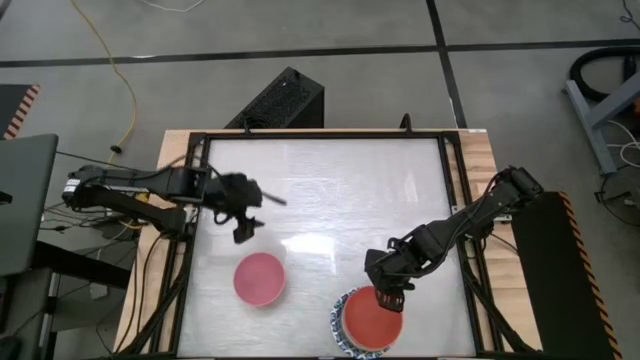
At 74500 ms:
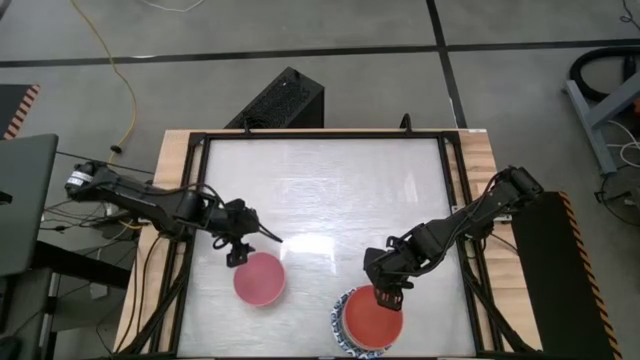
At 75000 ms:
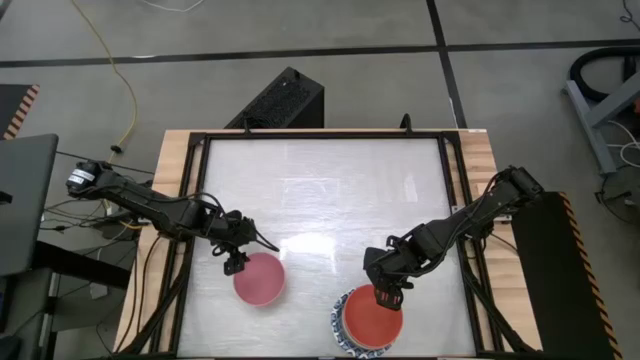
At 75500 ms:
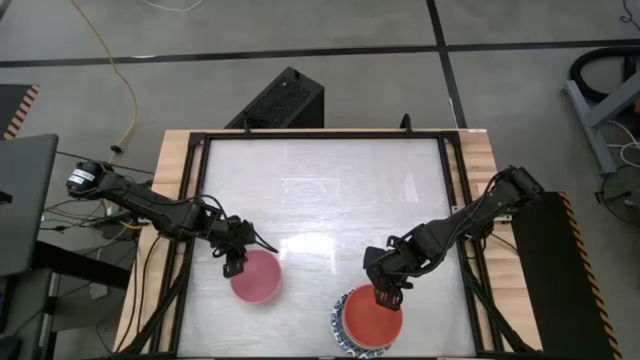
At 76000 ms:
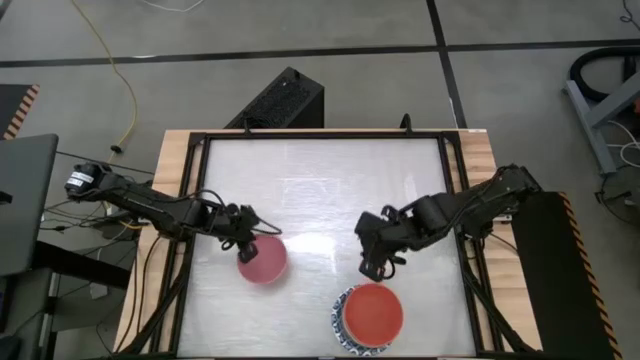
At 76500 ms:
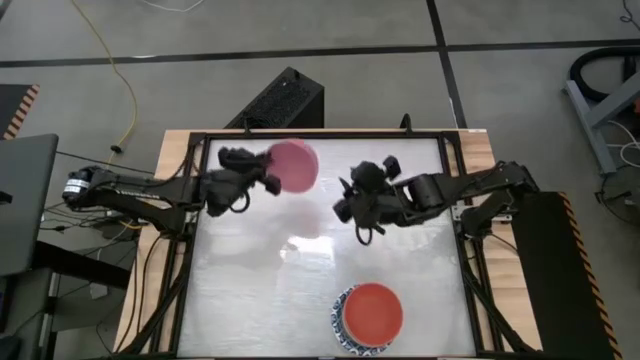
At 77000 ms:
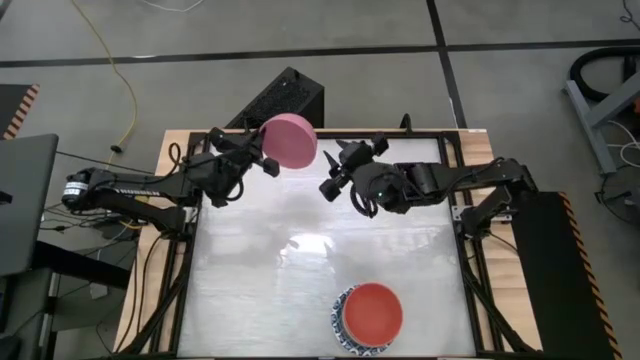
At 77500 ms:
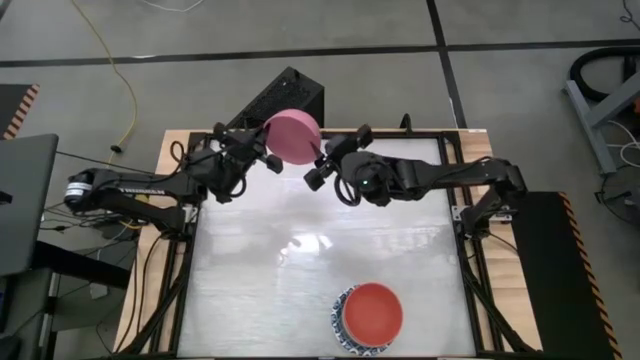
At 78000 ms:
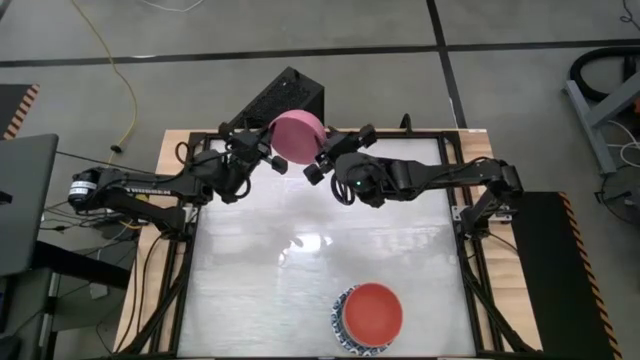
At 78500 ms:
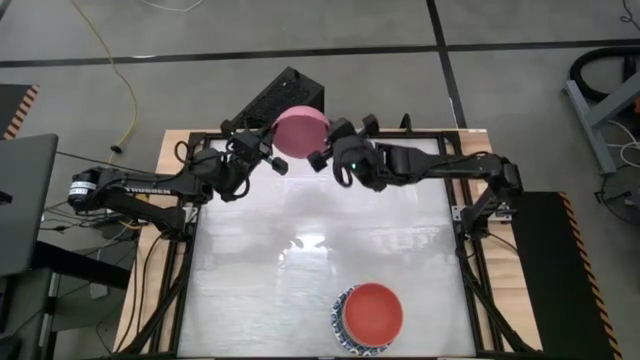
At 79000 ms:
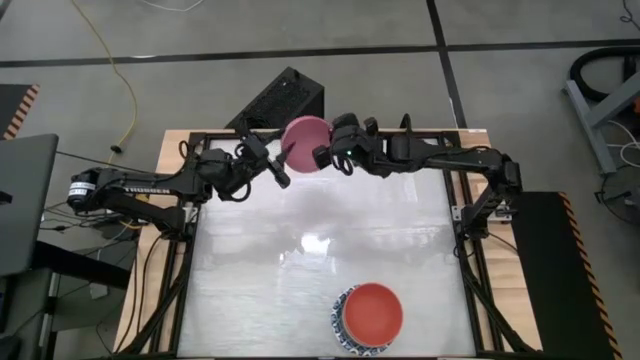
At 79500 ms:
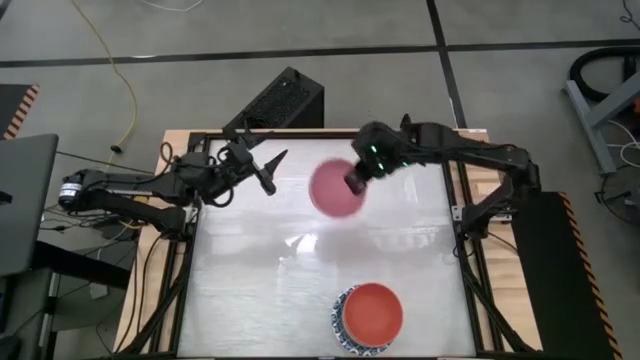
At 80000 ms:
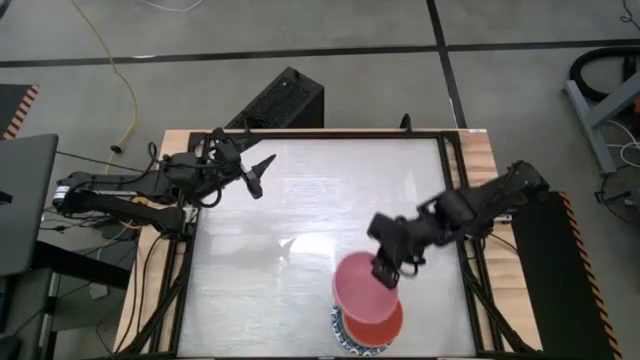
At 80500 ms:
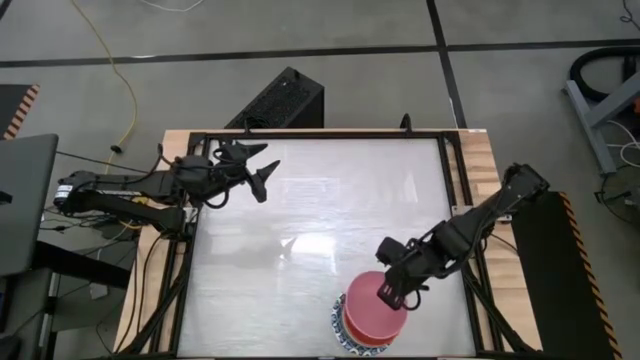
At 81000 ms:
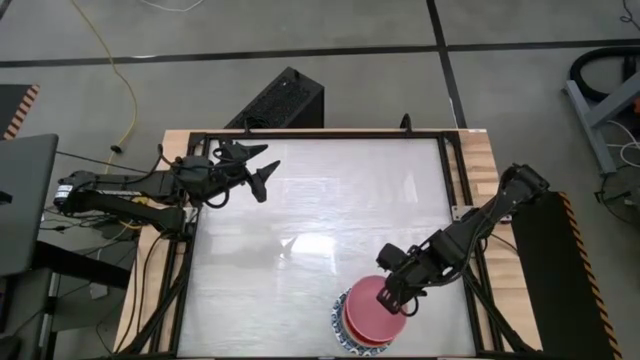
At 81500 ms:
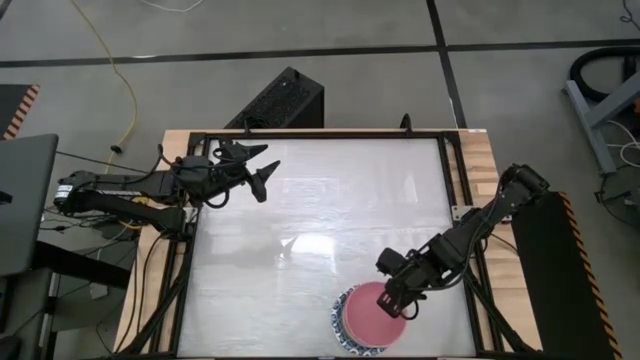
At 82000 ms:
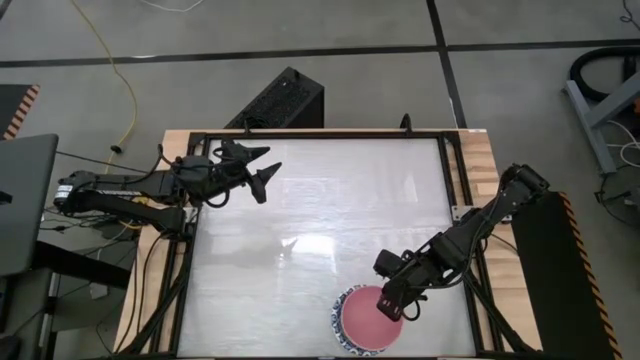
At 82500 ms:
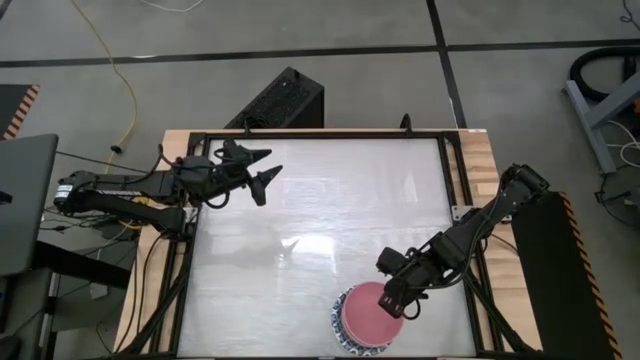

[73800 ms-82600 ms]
Stack the pink bowl onto the orange bowl

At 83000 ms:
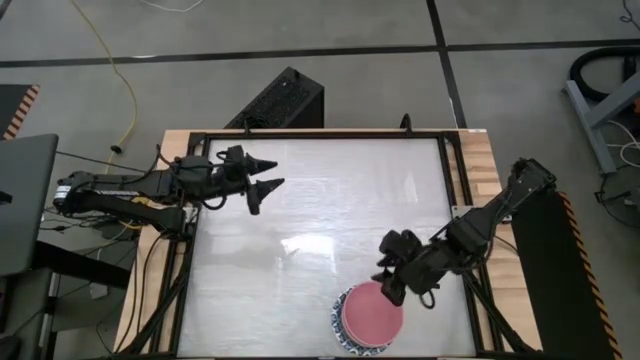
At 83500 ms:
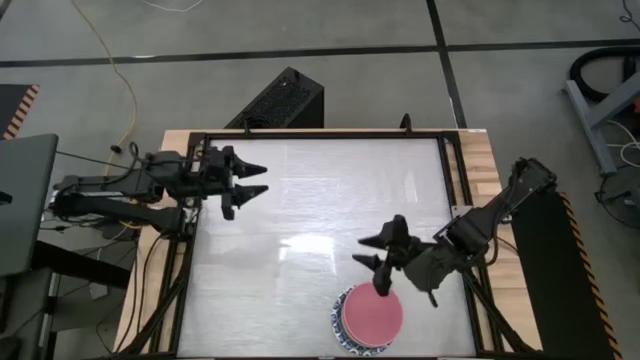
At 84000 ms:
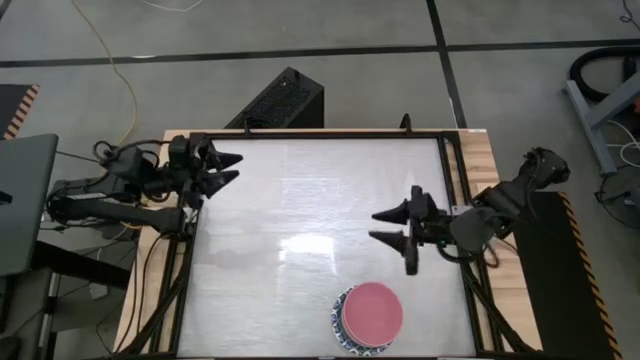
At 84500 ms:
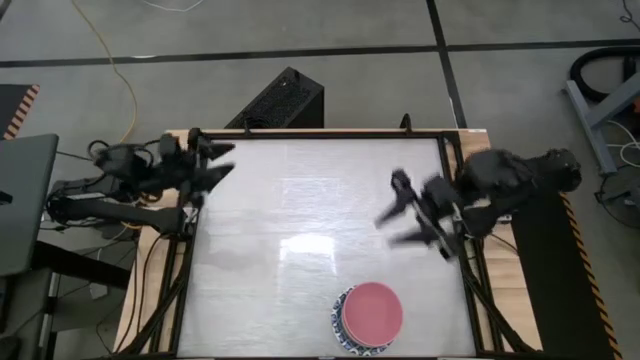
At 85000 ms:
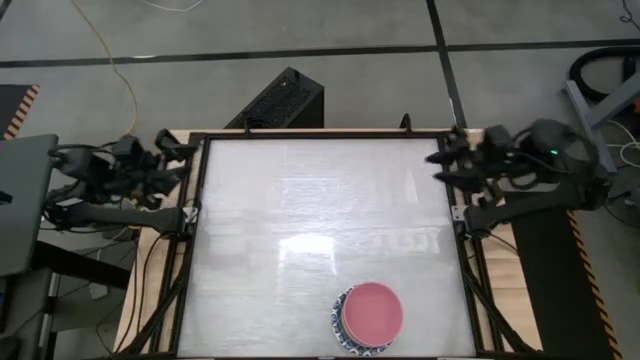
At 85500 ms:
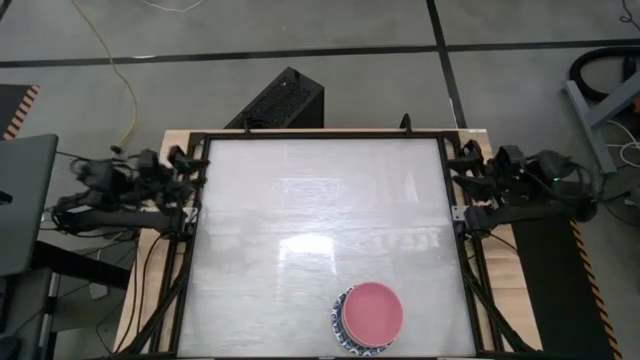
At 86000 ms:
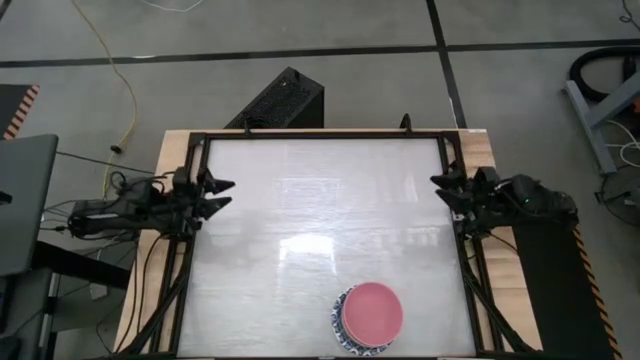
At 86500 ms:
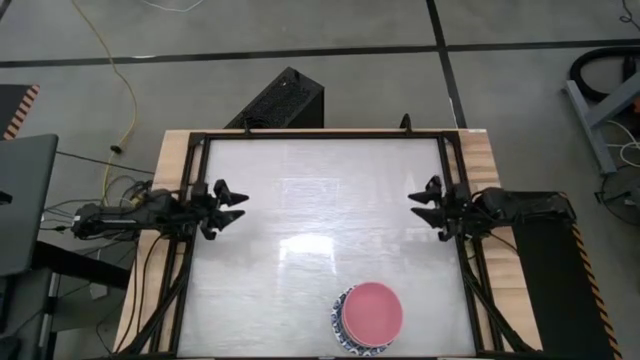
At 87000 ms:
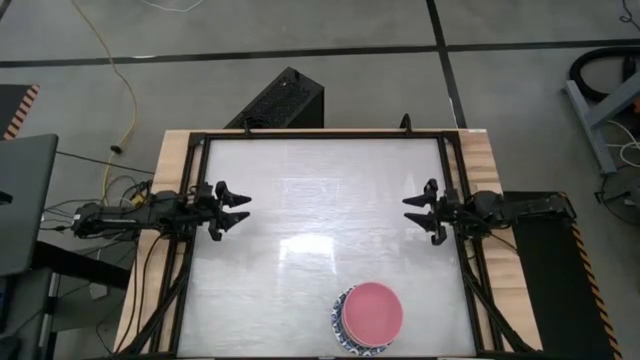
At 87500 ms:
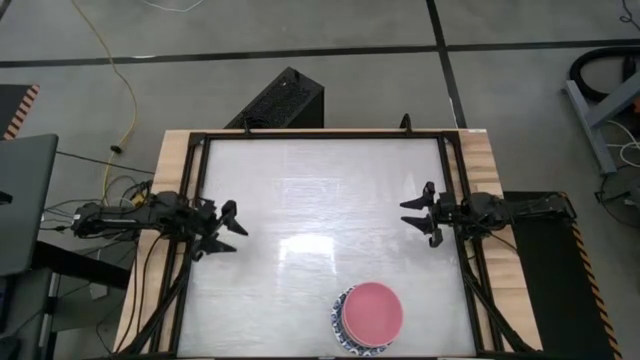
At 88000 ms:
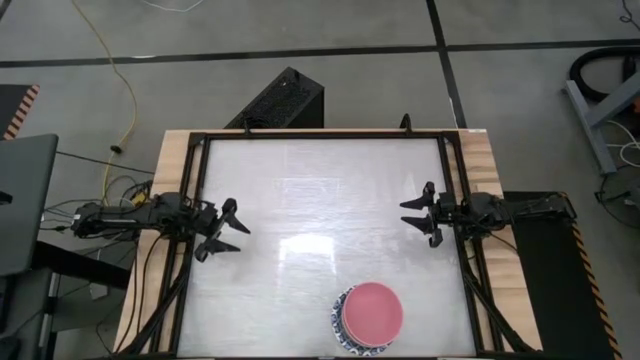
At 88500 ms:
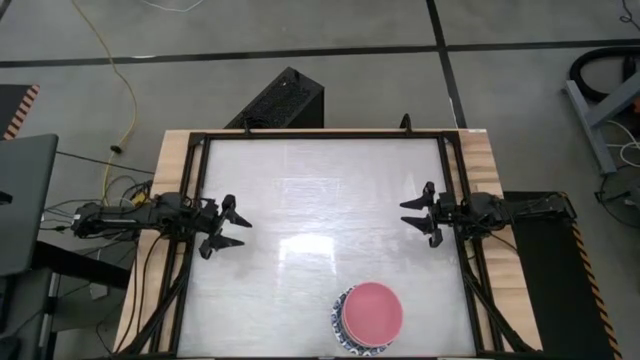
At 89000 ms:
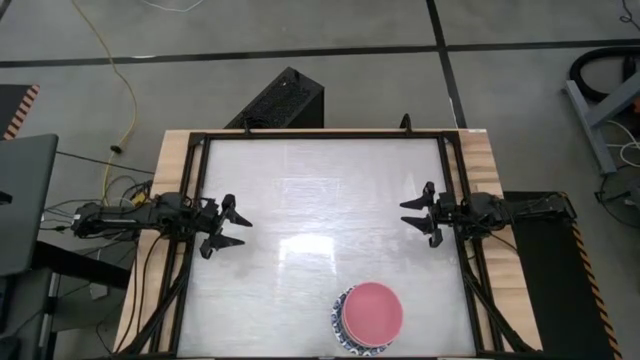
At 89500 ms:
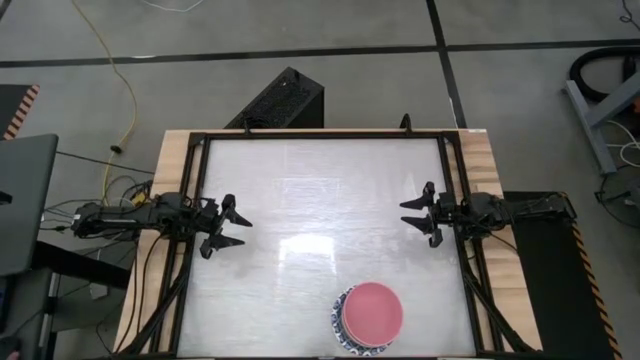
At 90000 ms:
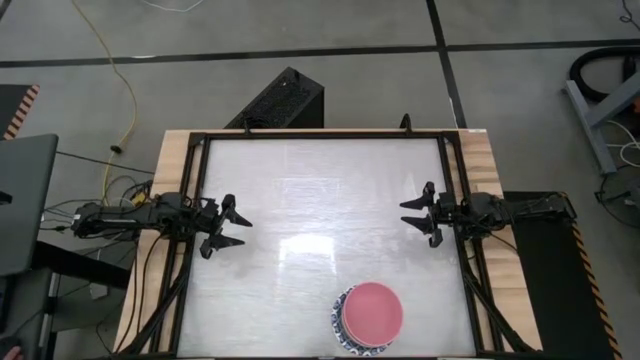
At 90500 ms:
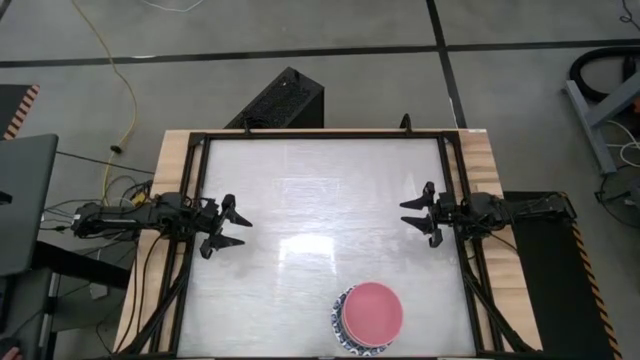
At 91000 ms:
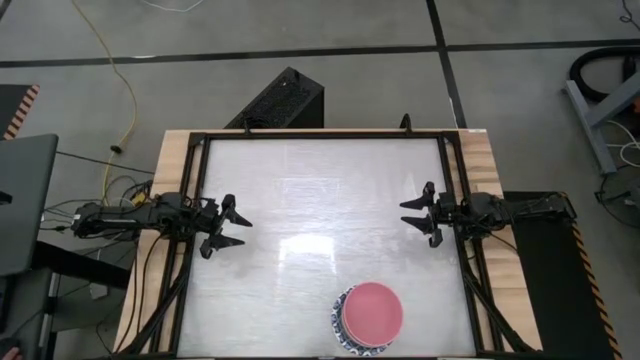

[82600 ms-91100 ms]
Return to Home Position

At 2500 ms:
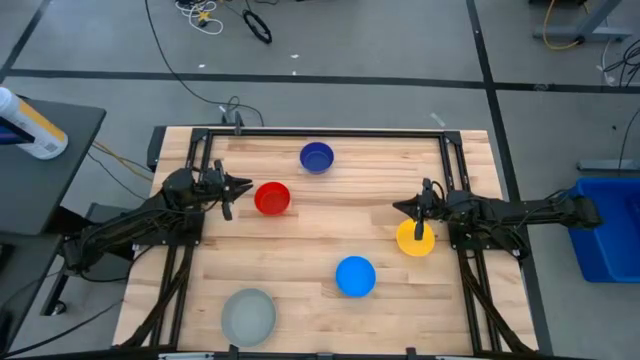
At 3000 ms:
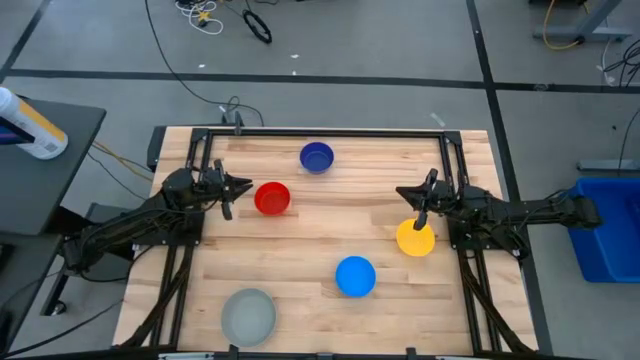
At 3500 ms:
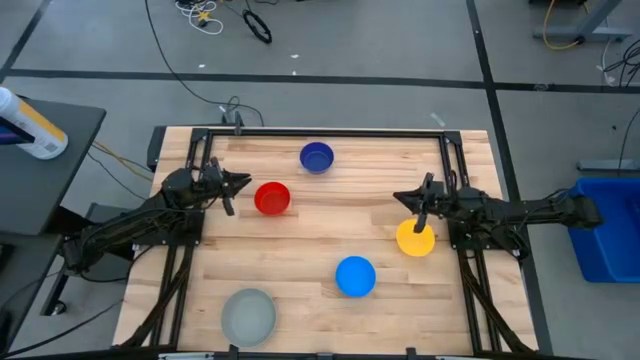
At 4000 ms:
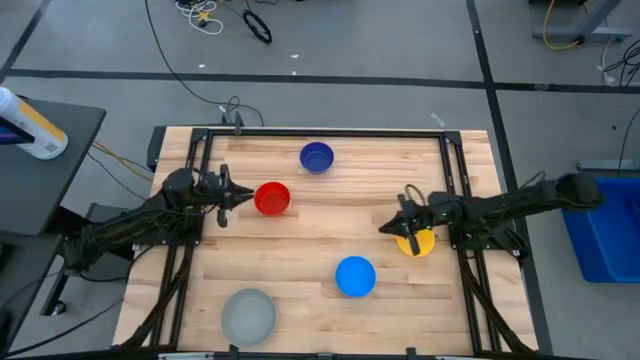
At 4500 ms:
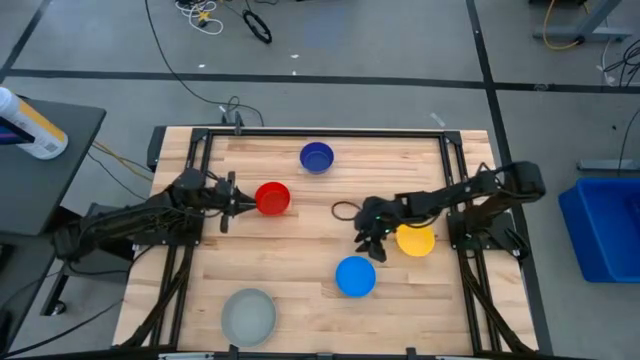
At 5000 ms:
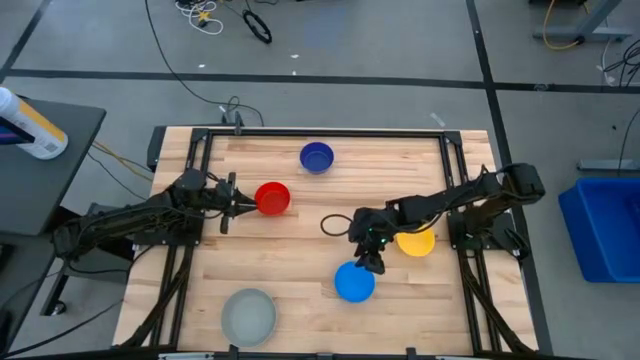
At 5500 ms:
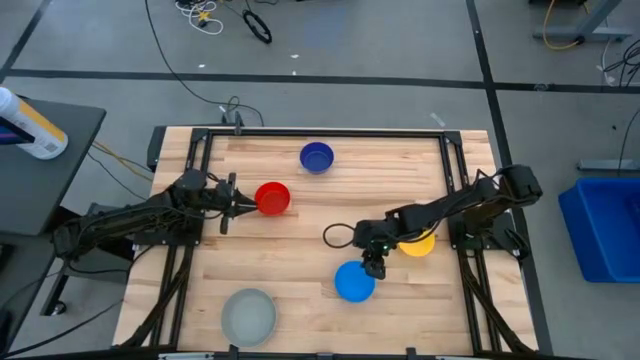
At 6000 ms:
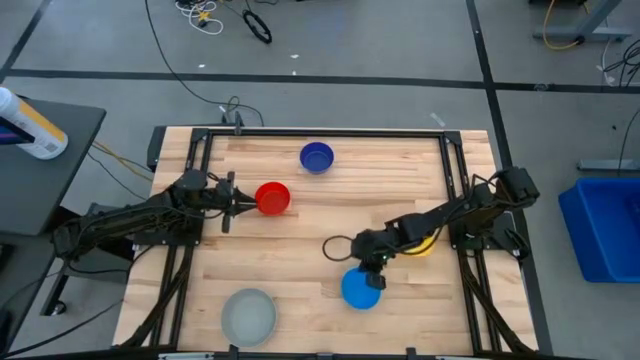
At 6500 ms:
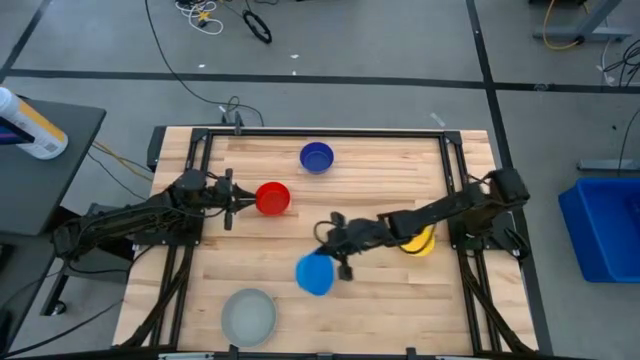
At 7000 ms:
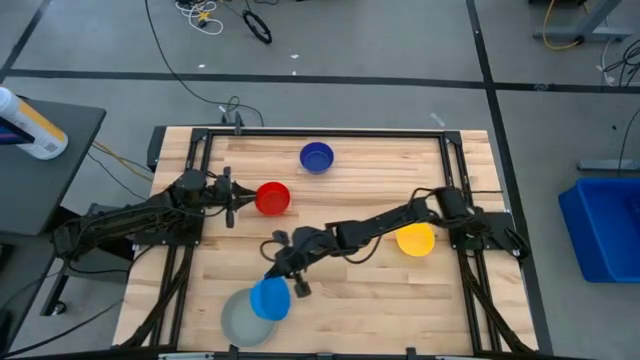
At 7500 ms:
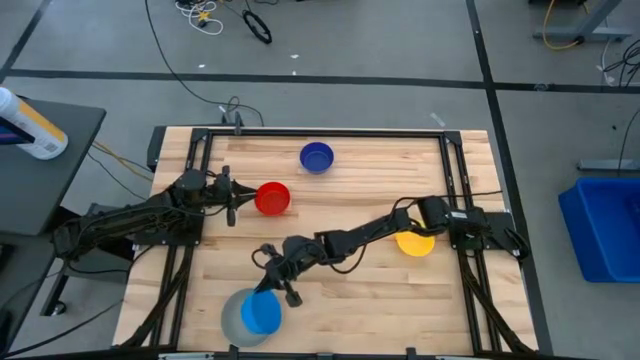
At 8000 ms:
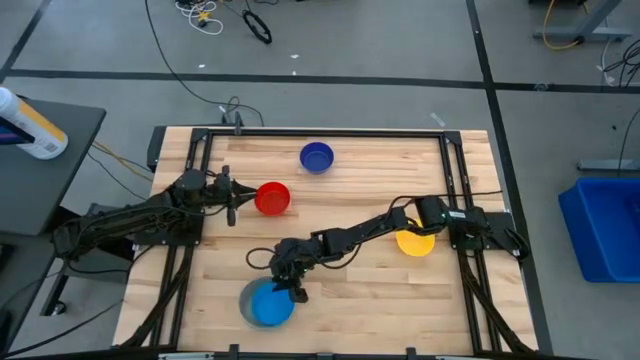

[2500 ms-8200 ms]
Stack the light blue bowl on top of the gray bowl
